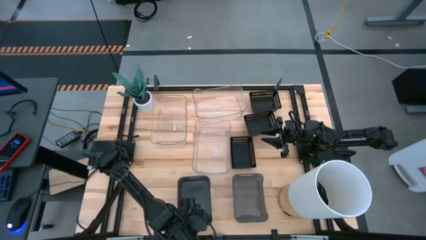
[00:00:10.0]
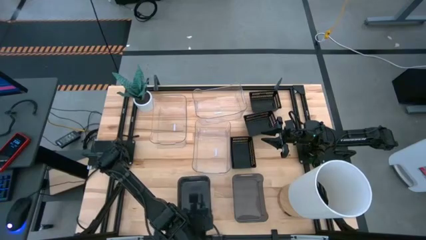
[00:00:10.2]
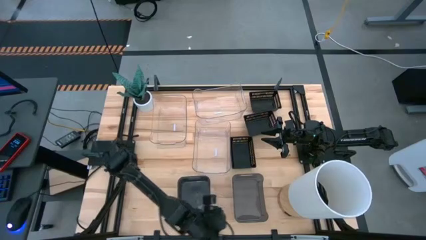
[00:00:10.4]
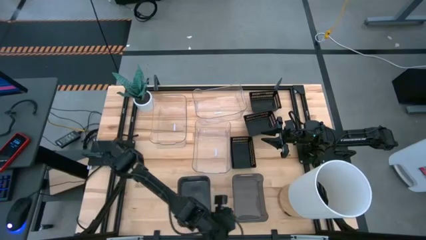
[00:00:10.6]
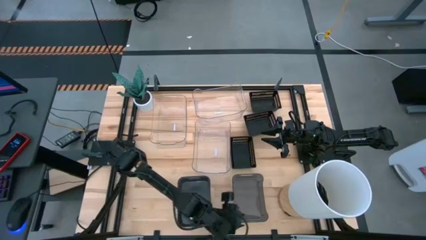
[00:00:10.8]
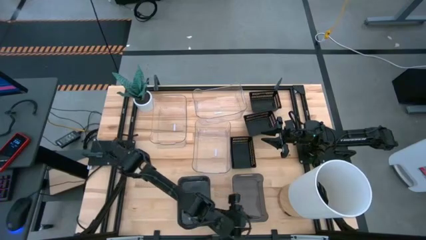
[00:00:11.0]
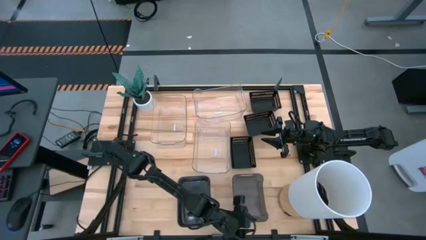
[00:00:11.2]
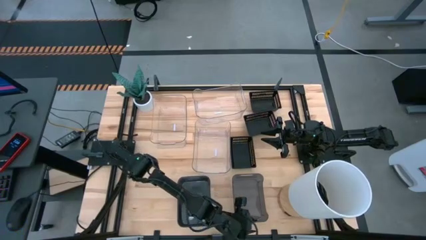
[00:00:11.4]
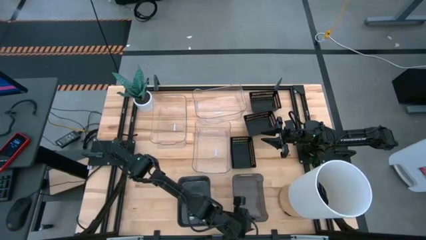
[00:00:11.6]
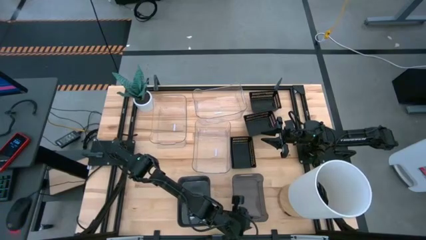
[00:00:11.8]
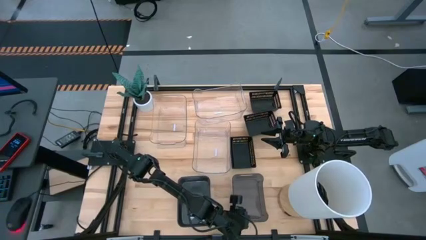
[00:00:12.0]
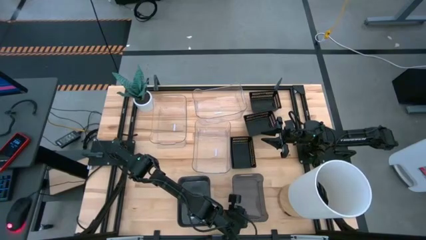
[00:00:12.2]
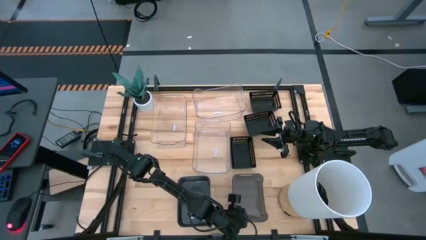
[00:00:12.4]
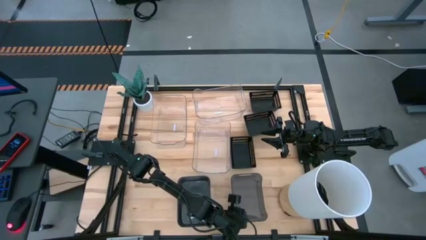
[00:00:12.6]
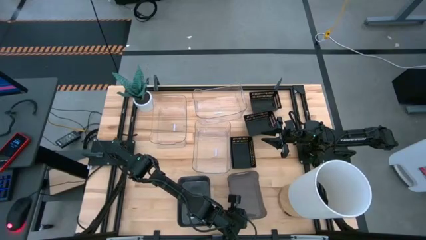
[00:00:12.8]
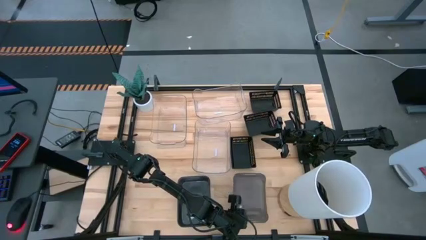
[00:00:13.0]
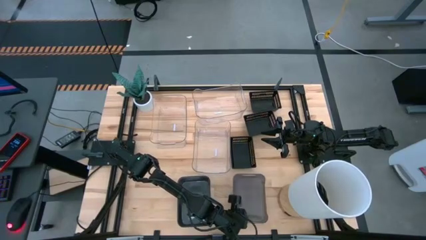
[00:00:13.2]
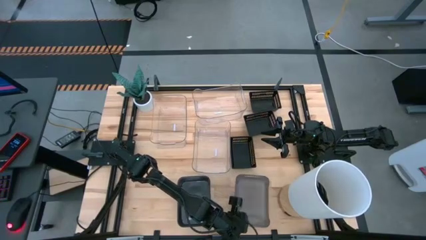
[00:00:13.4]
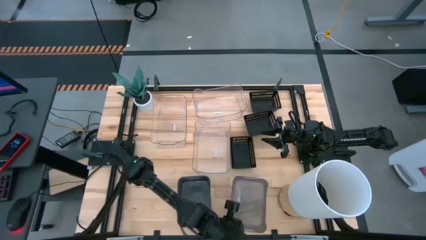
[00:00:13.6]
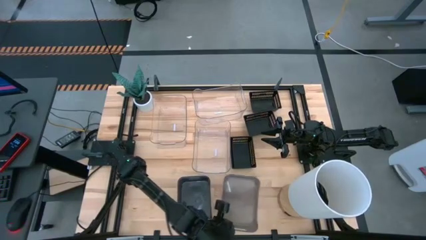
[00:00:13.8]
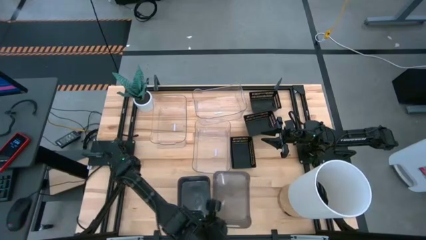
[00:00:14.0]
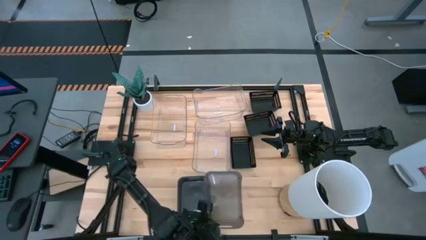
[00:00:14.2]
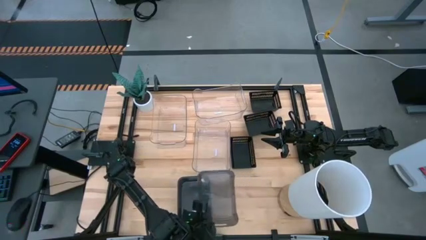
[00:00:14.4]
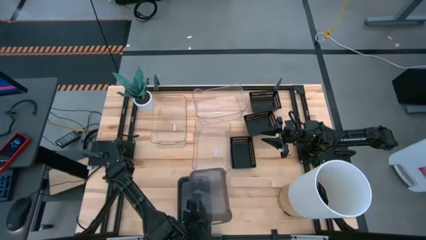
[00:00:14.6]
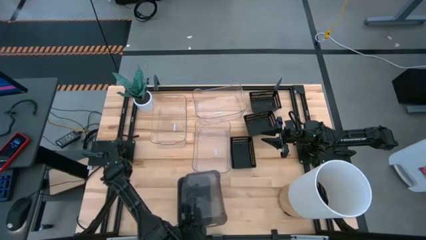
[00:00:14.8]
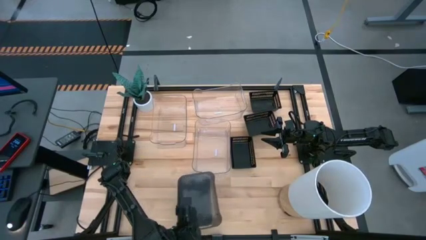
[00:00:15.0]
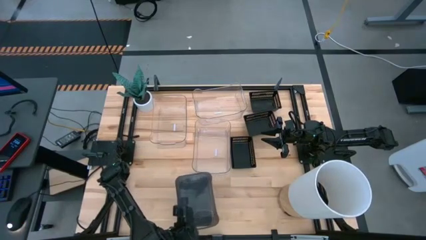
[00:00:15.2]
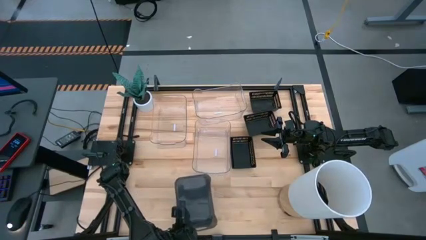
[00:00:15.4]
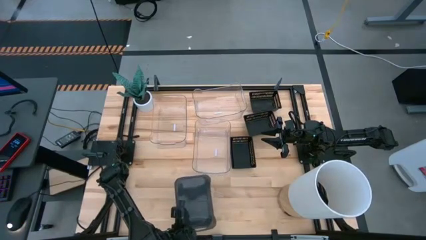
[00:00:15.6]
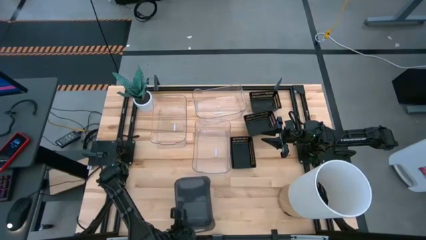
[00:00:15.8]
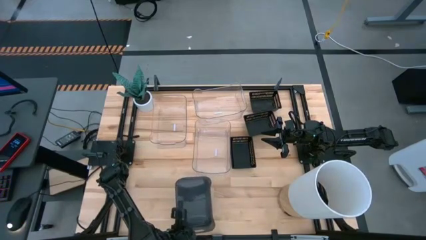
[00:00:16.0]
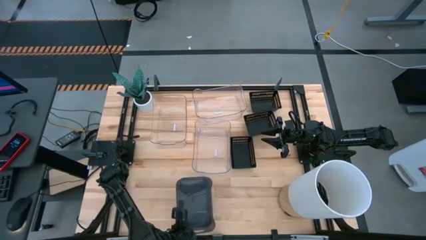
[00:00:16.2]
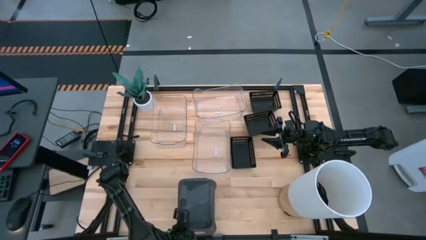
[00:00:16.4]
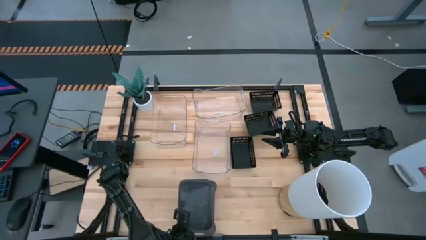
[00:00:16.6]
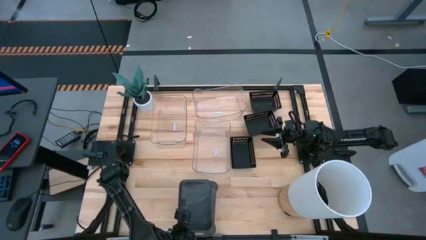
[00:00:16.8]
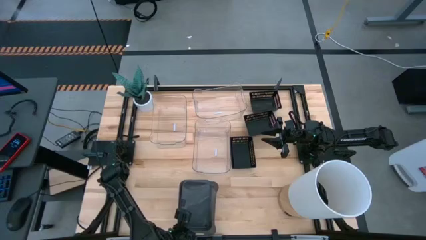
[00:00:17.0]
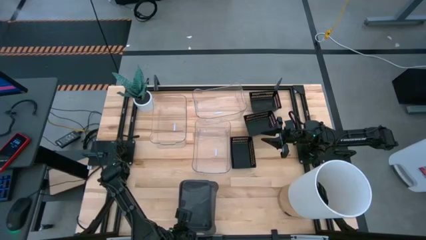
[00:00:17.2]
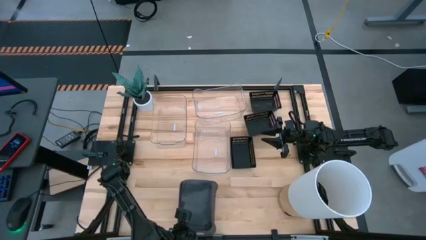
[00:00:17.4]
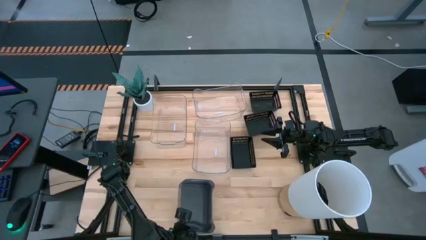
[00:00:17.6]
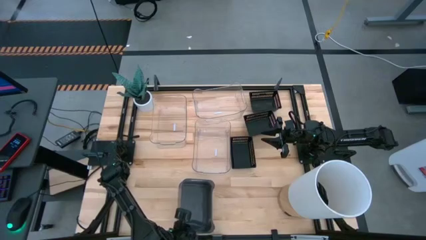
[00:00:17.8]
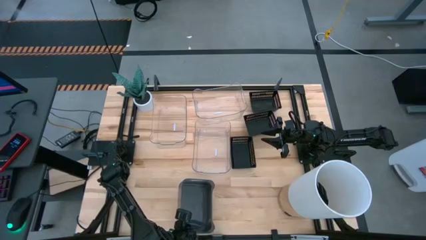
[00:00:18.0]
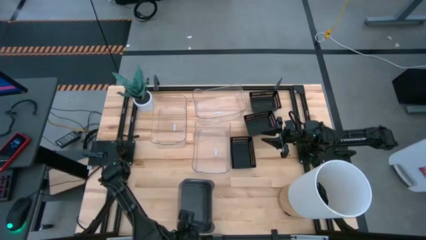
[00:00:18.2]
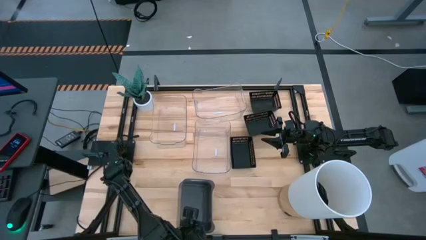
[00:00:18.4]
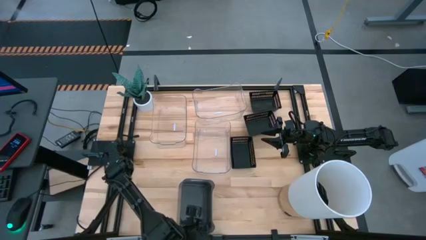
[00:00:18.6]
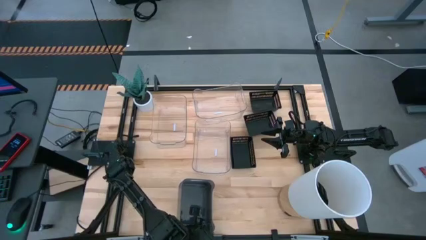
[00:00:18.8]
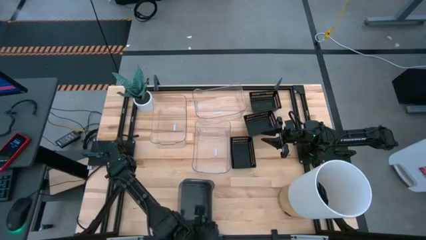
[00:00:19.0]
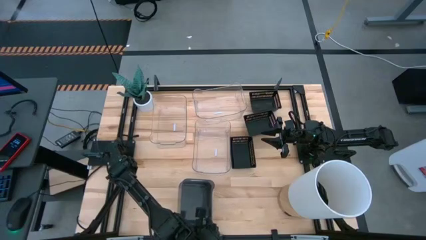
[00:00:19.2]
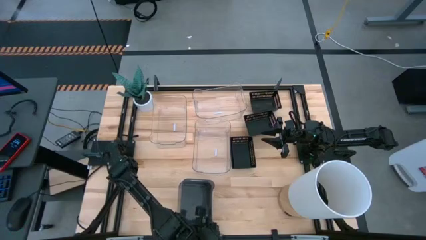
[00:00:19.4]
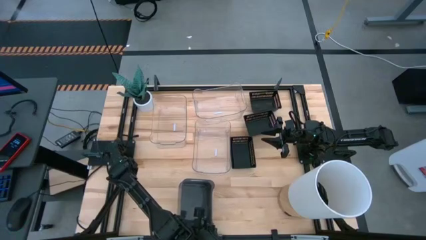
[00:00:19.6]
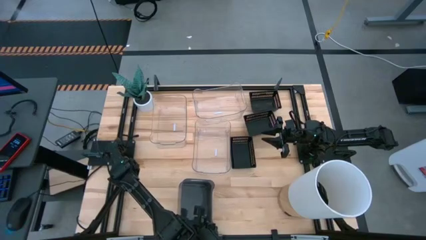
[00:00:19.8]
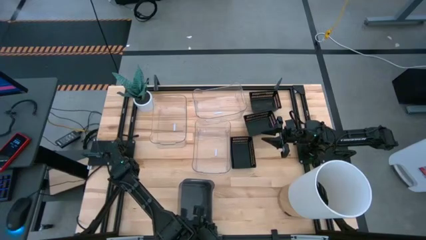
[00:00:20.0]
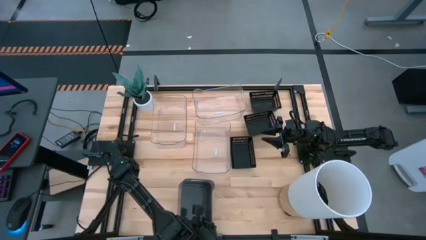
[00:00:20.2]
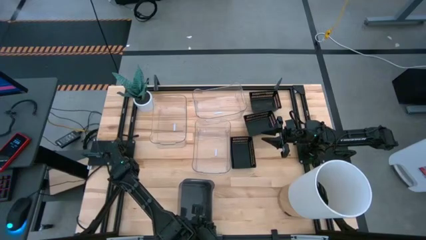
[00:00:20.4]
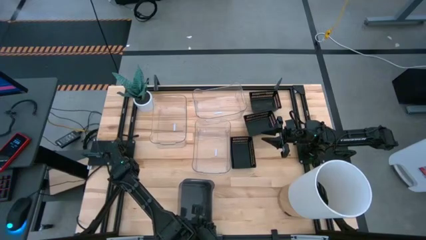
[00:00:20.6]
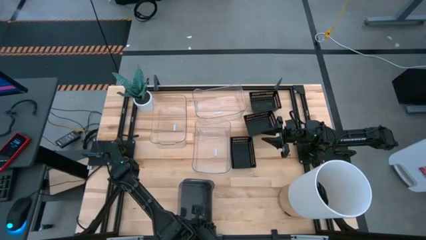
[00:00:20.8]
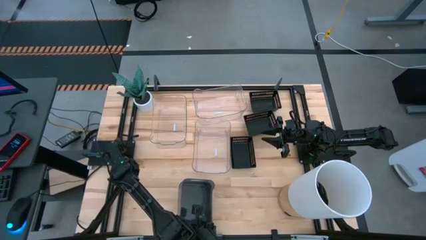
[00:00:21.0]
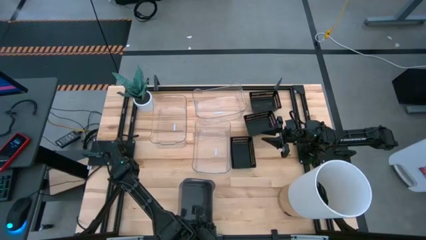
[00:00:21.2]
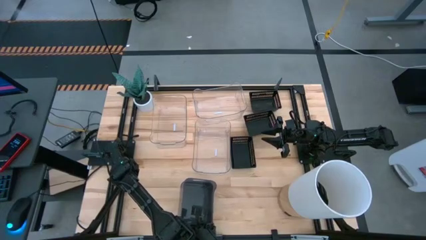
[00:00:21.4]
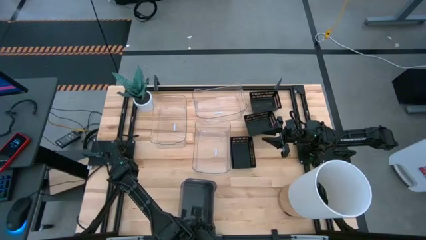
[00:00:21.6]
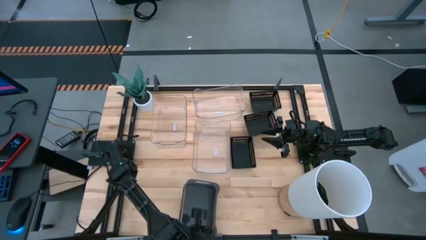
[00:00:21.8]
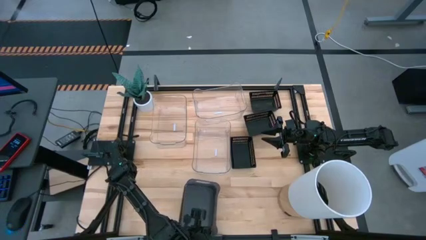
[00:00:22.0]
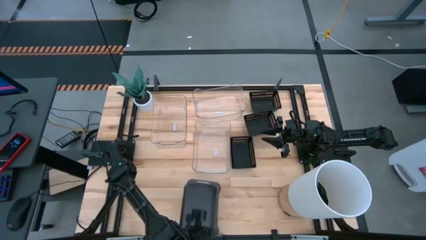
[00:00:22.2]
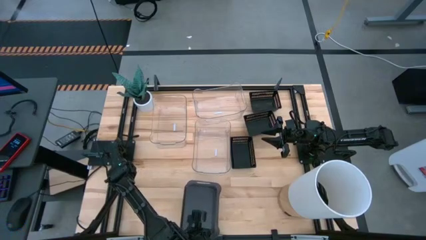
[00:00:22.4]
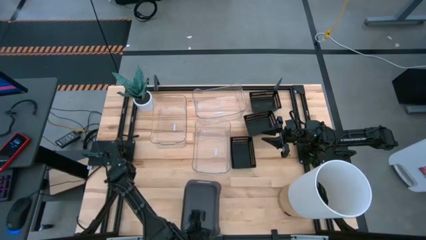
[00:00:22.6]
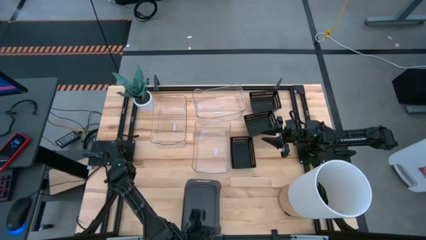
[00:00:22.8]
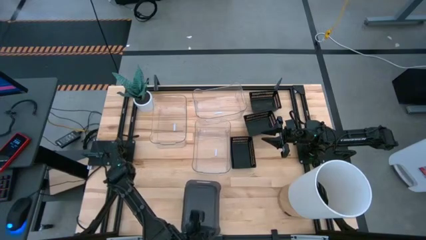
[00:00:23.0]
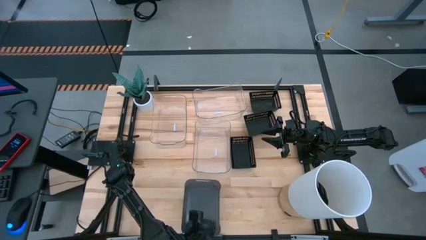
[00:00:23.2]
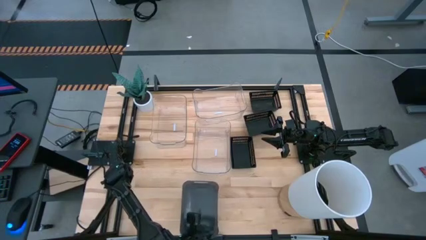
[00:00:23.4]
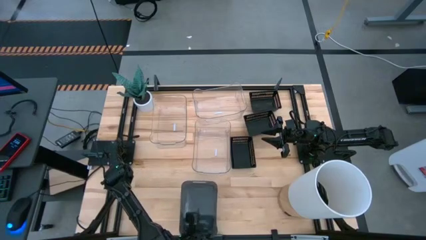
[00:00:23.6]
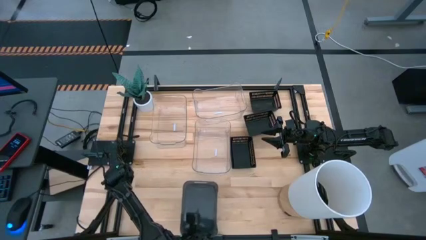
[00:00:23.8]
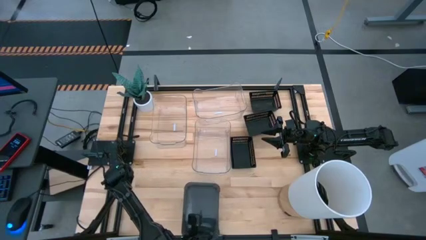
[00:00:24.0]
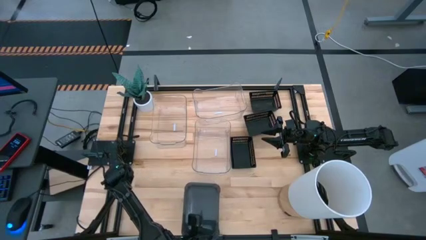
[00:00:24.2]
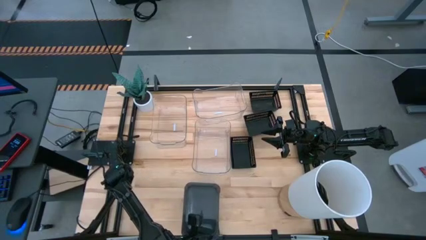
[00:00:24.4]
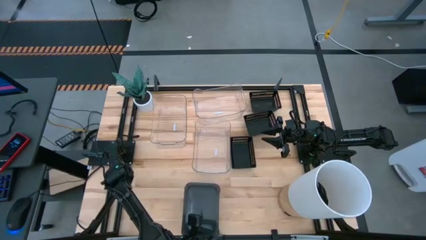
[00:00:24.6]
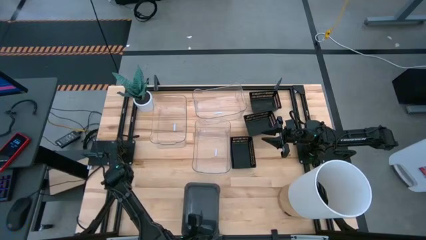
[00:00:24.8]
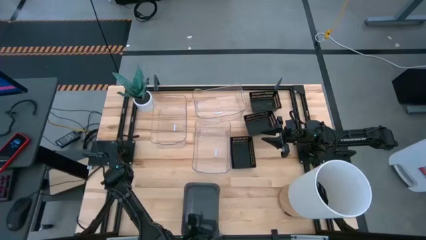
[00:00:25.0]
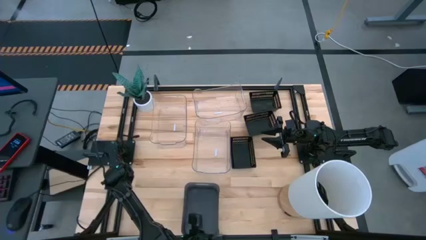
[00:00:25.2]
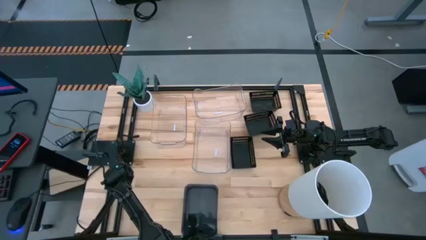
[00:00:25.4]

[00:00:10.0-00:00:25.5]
Stack the black transparent bin on top of the stacked black transparent bin
